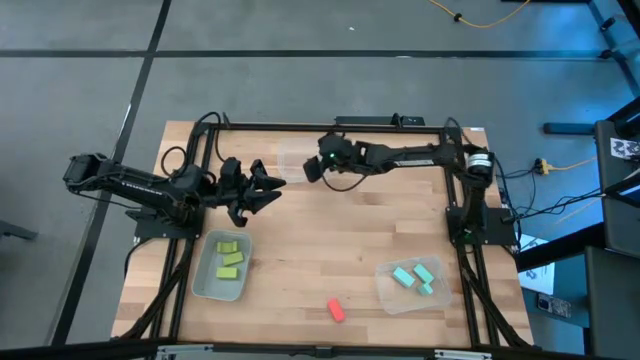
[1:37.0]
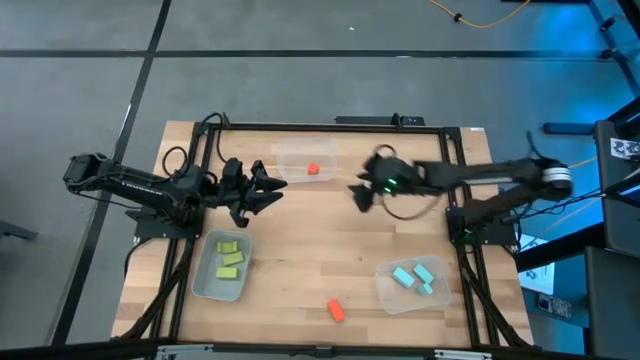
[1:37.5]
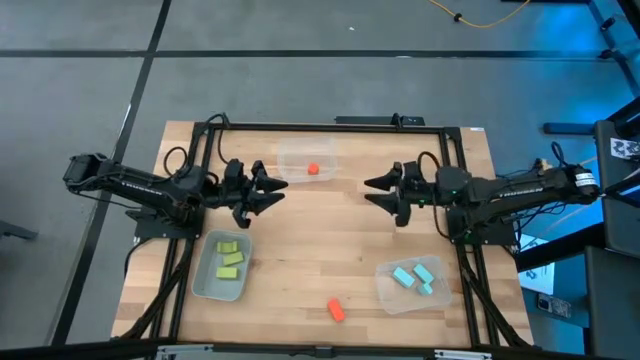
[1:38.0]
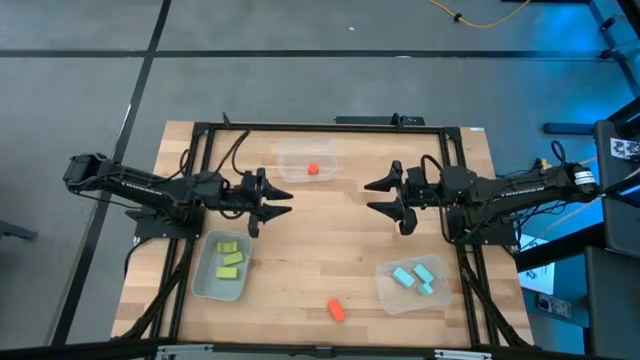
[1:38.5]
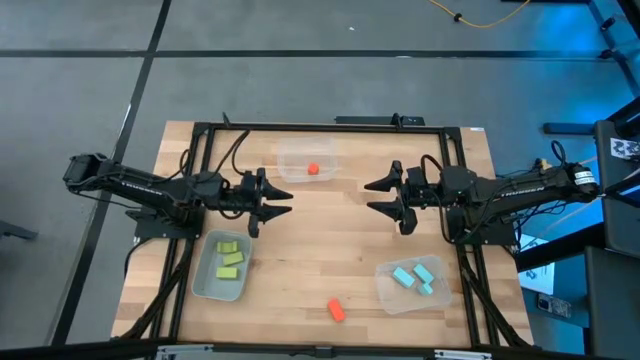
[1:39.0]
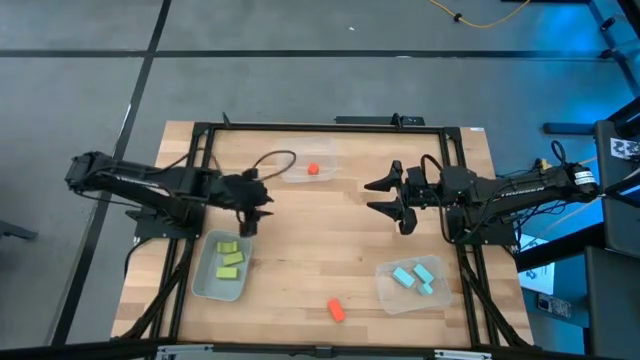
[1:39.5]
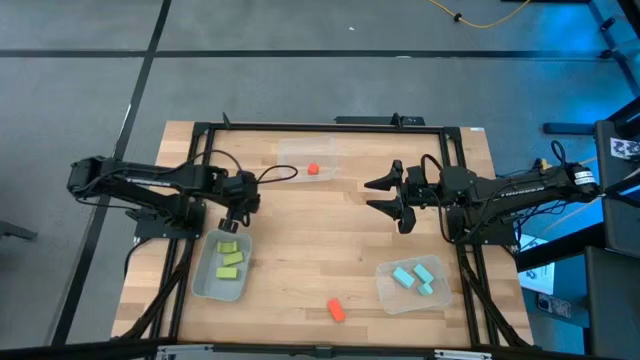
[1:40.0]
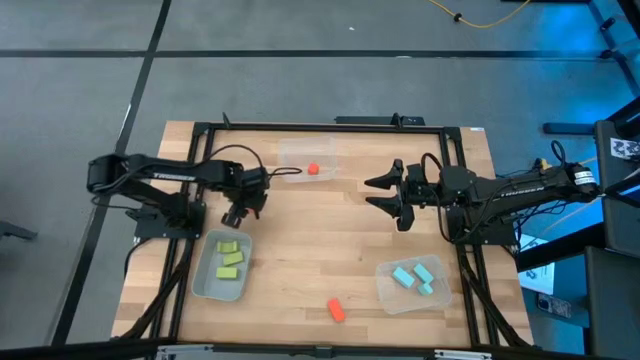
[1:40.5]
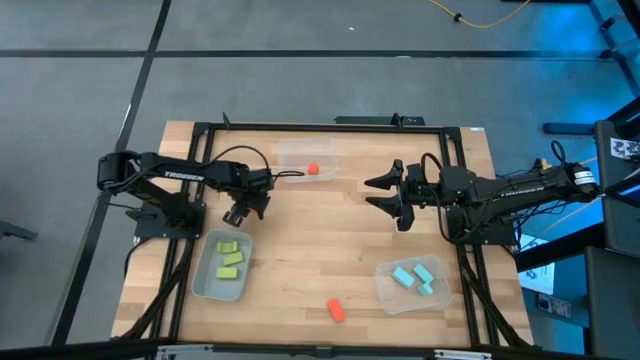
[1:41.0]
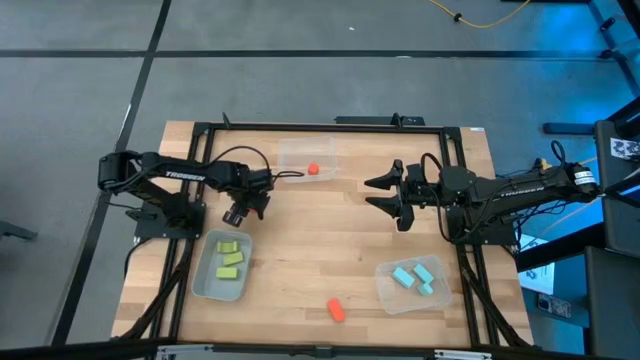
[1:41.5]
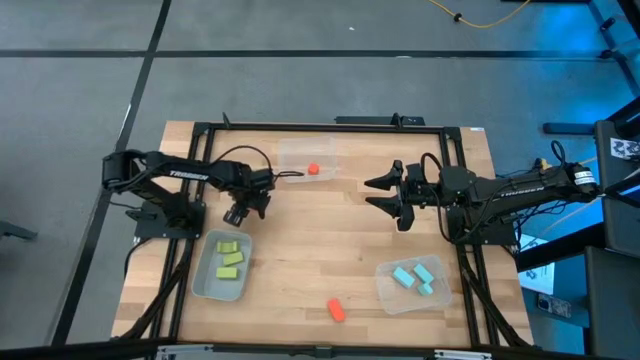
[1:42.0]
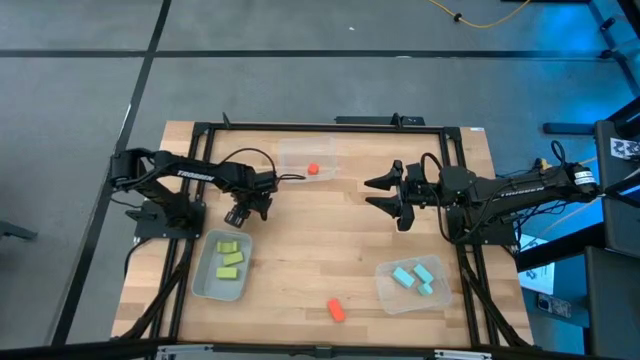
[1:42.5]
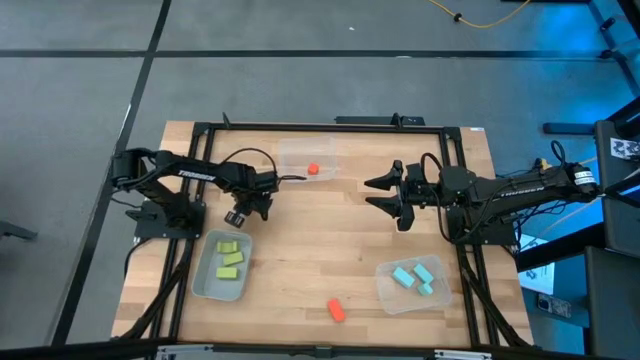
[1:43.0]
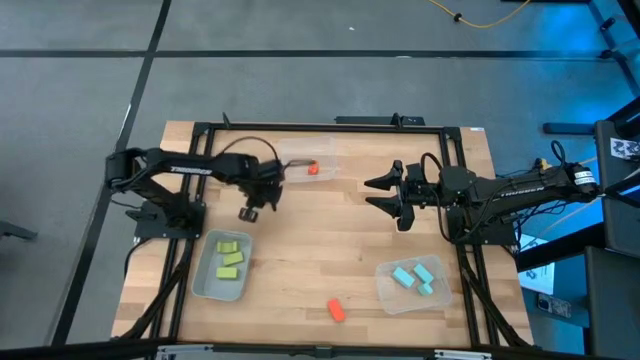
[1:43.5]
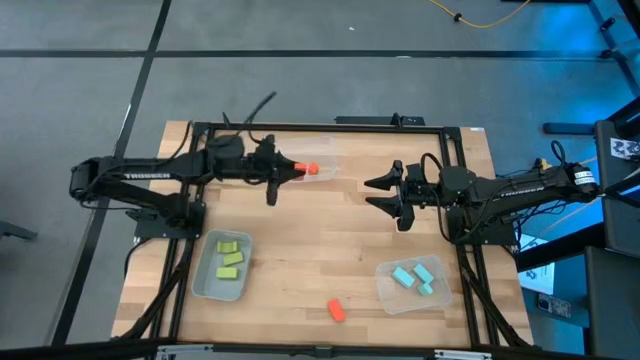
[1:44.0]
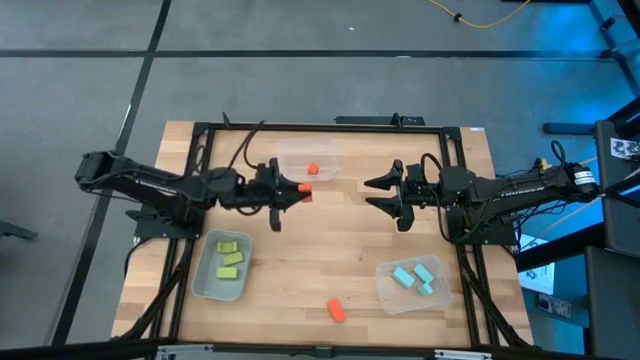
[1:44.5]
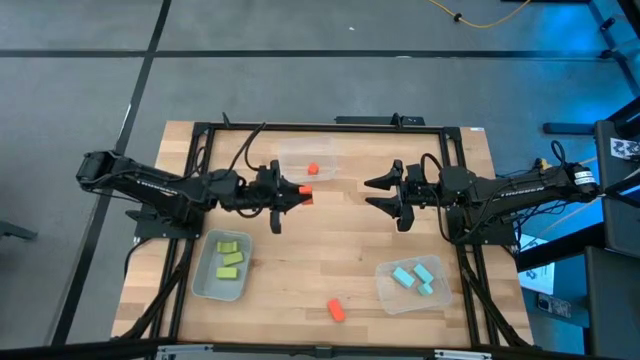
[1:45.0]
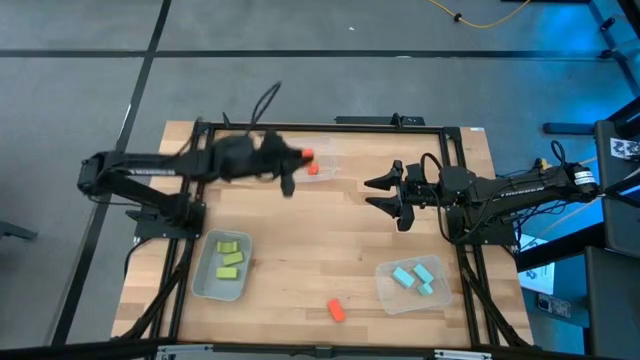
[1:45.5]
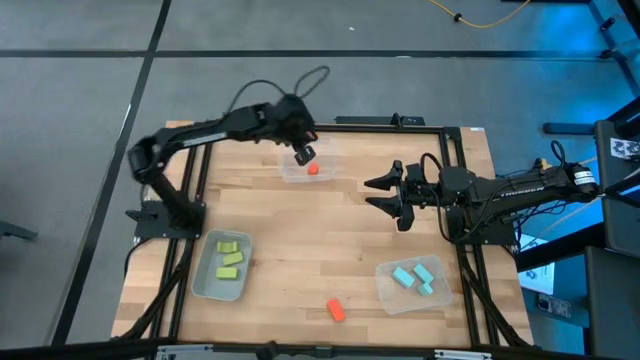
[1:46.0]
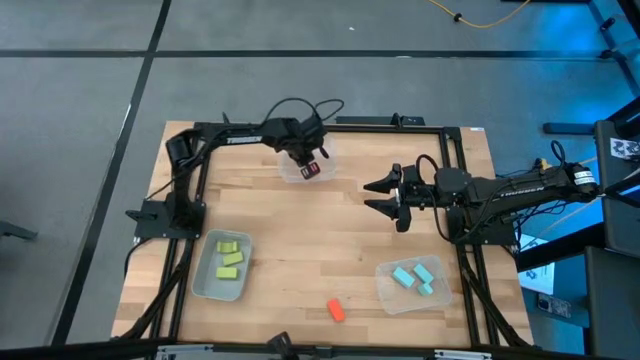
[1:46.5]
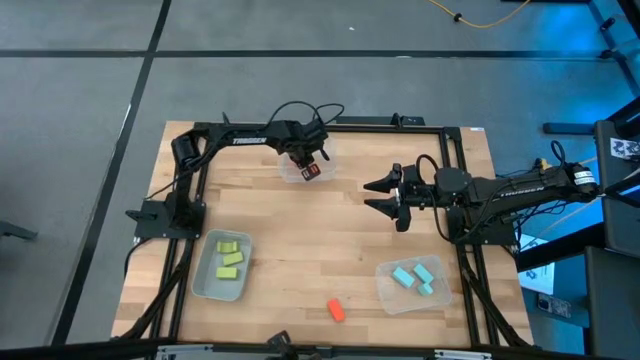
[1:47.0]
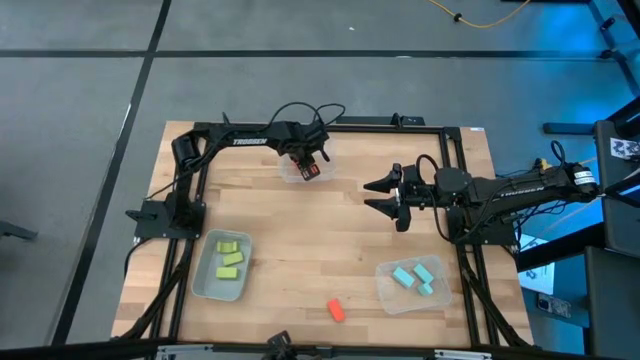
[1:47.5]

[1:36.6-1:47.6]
Task: Sort & place blocks by color
Put the top left orange half pillar block into the top transparent bin

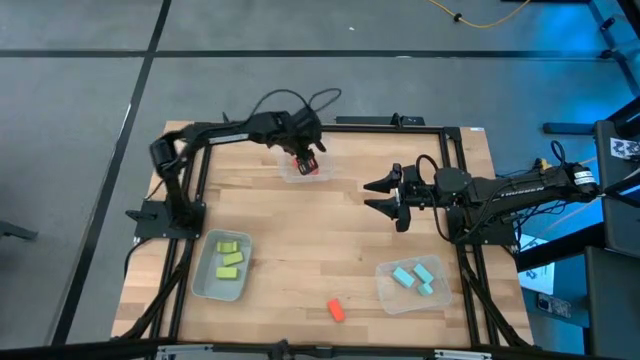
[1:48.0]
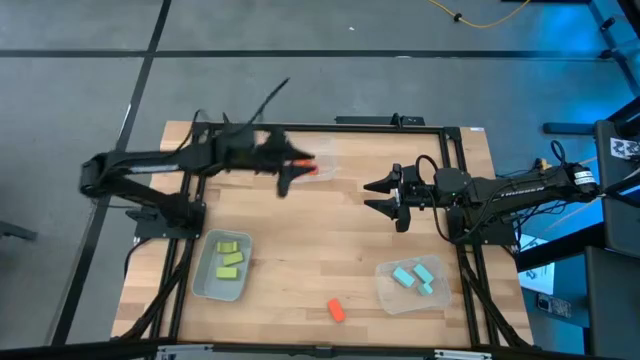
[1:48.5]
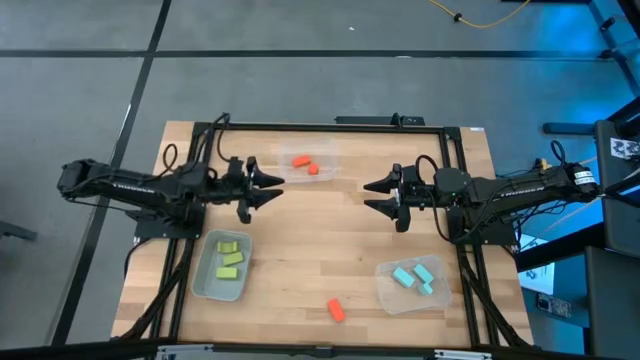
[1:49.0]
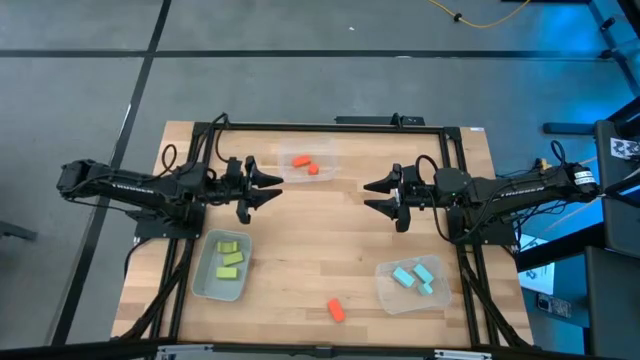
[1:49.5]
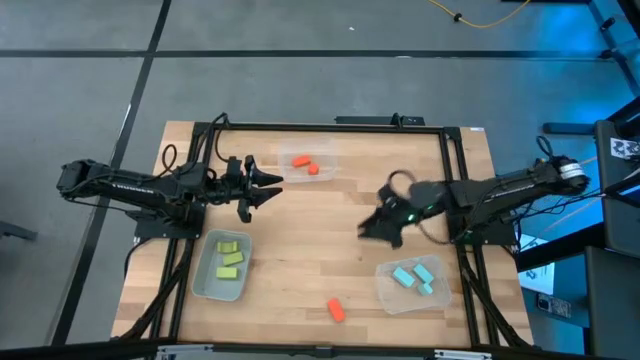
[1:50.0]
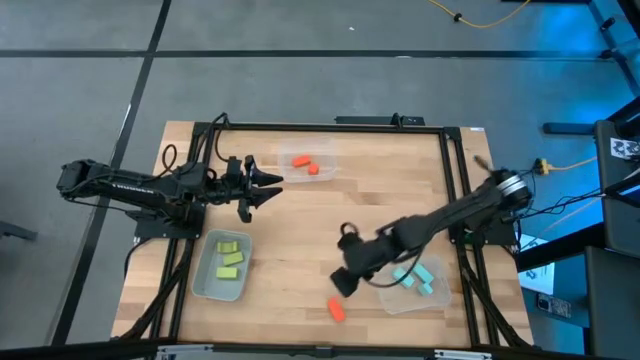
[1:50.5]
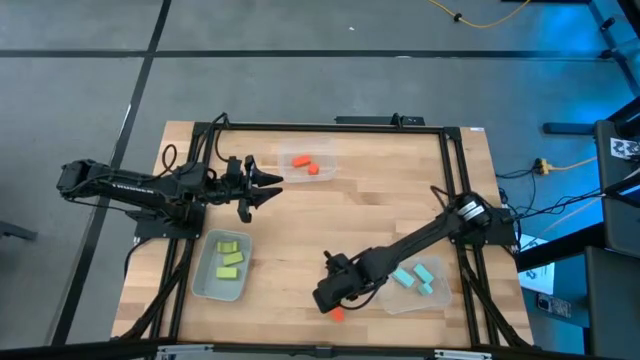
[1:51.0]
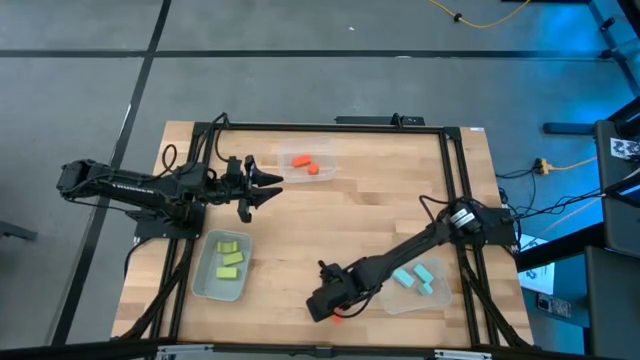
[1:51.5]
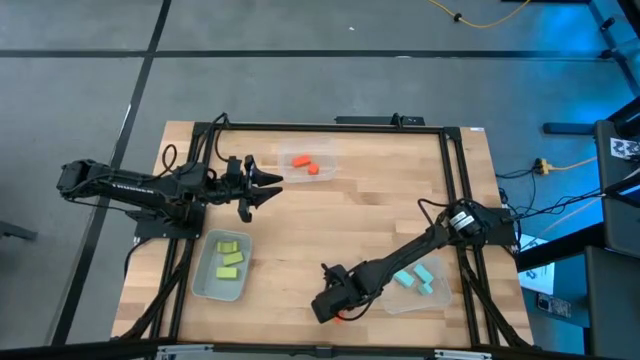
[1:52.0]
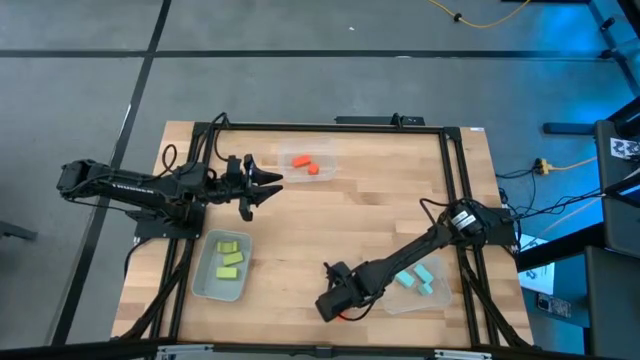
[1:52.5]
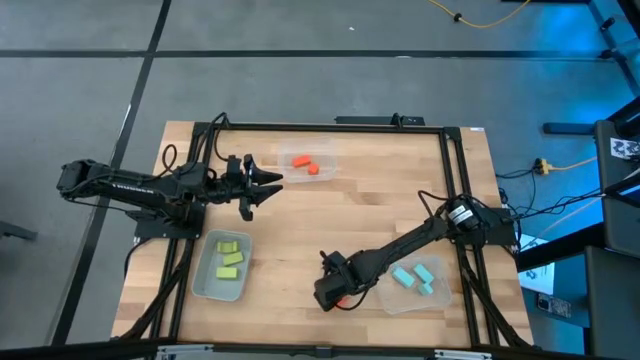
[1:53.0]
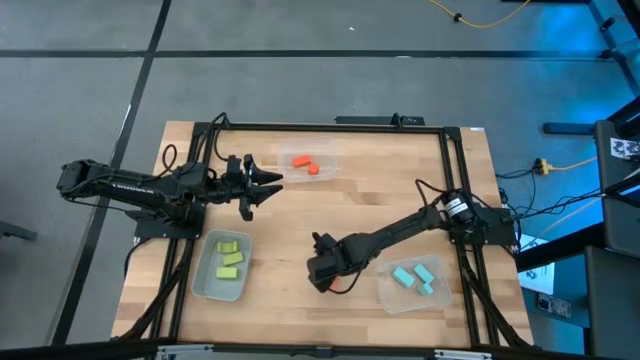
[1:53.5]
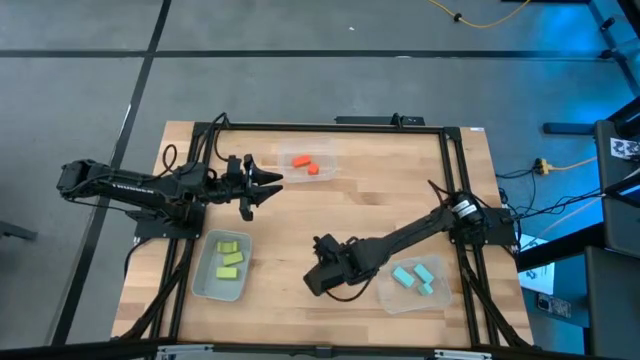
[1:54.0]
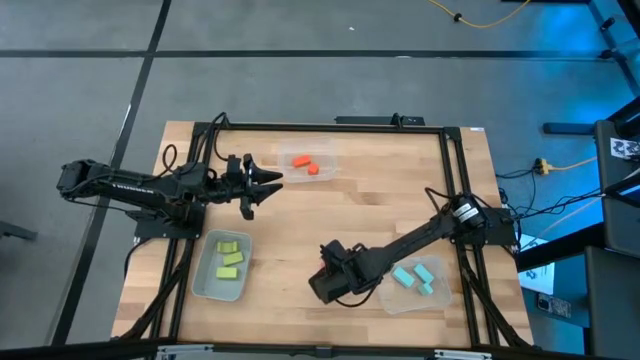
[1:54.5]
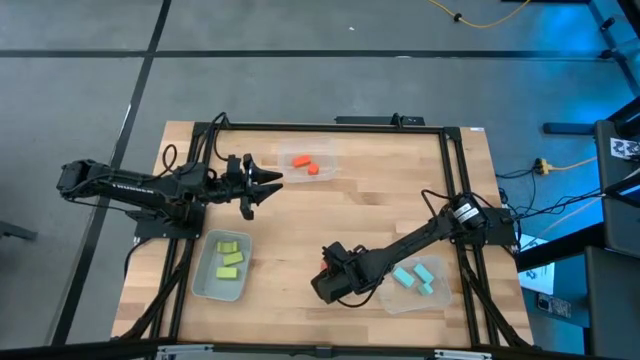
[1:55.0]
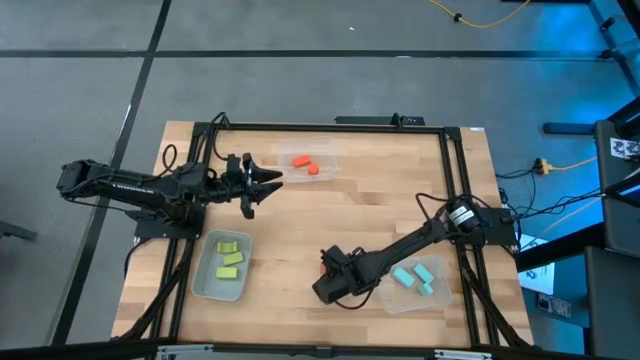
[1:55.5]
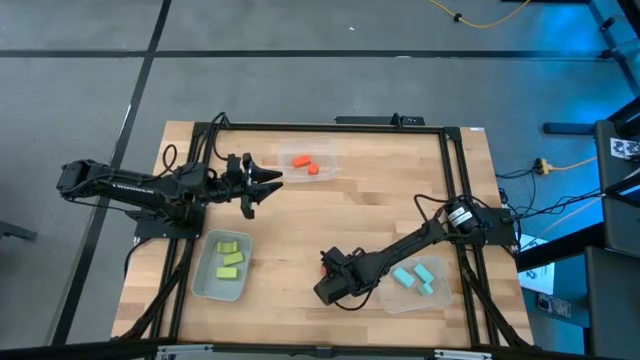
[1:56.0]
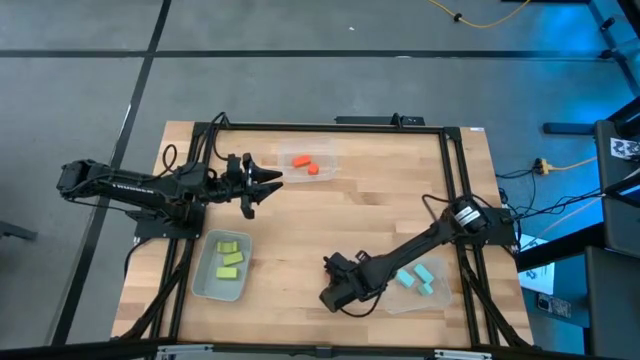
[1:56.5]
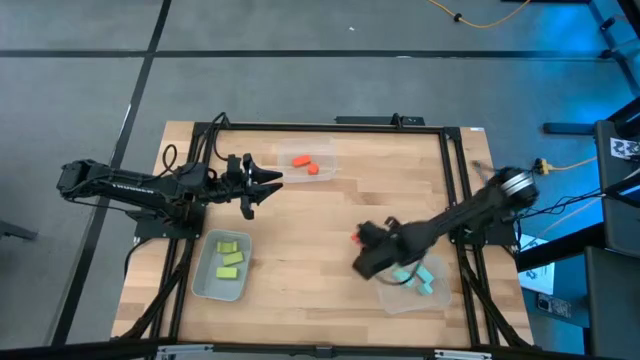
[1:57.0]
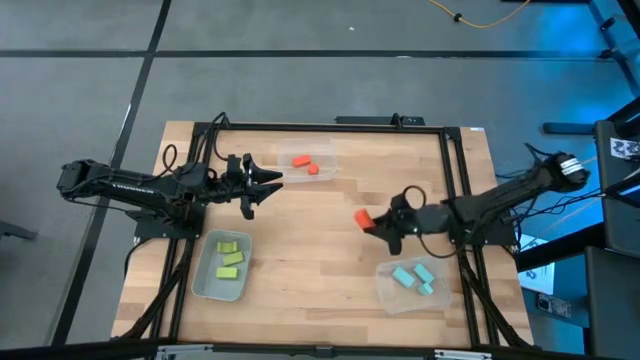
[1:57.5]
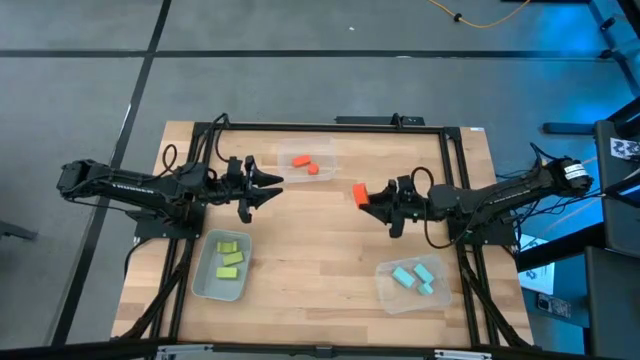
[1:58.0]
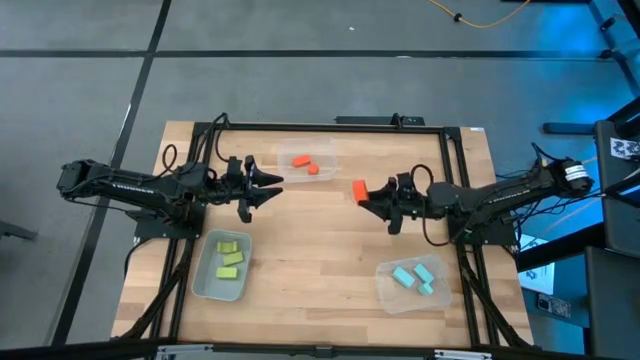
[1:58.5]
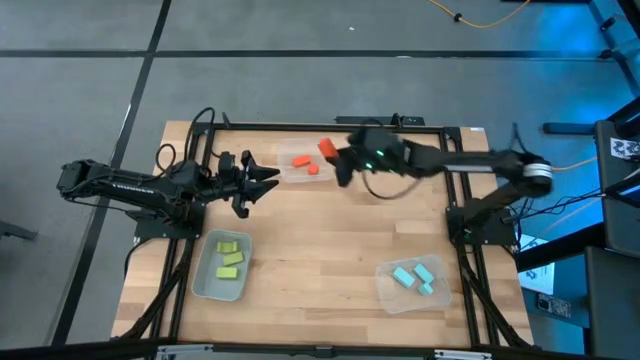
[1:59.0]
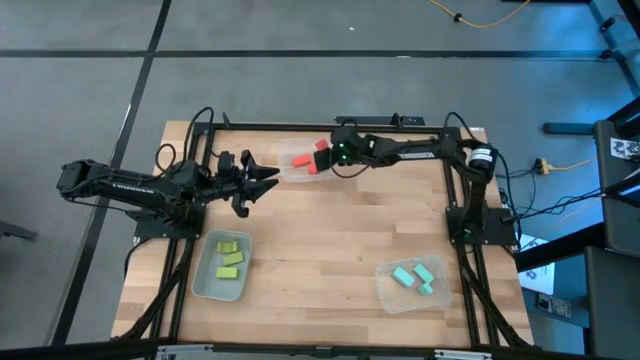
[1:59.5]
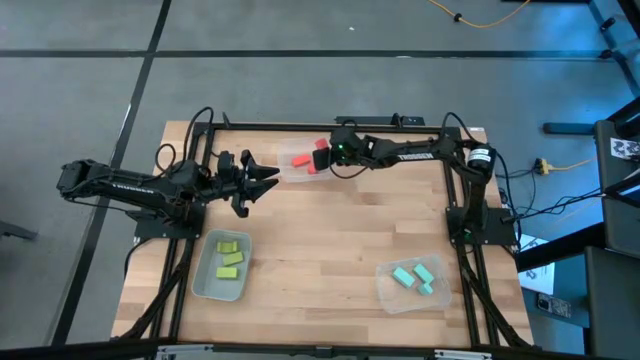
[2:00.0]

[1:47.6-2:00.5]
Put the orange half pillar block into the top transparent bin
